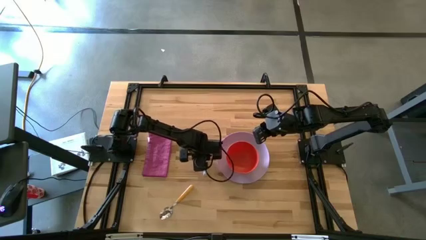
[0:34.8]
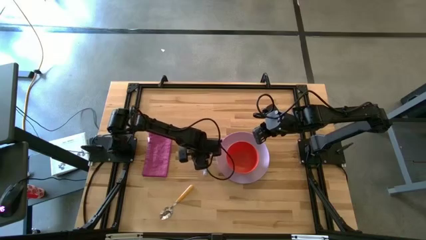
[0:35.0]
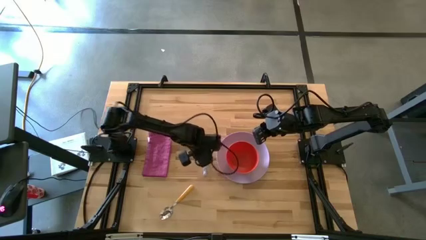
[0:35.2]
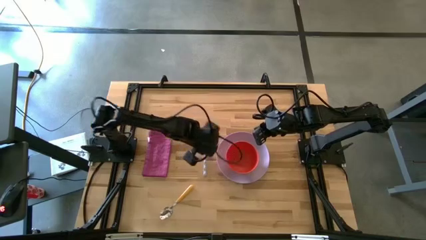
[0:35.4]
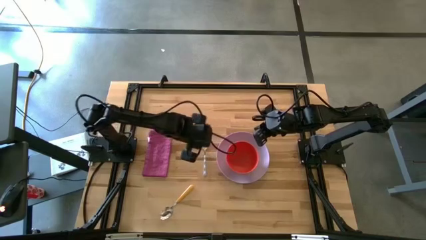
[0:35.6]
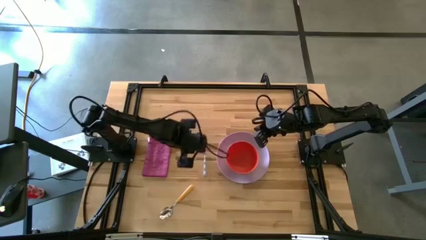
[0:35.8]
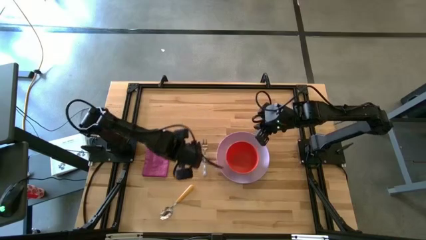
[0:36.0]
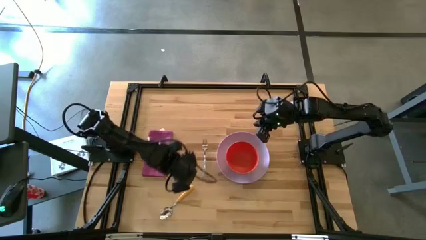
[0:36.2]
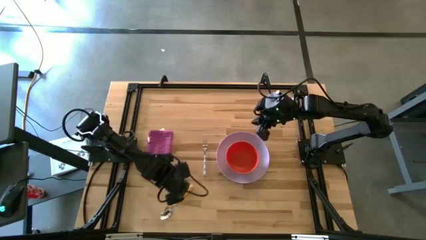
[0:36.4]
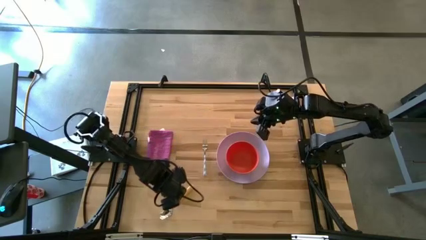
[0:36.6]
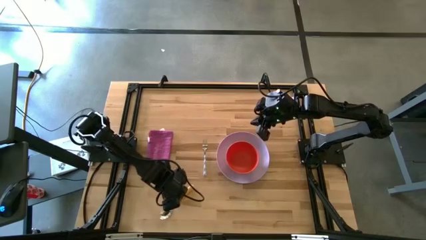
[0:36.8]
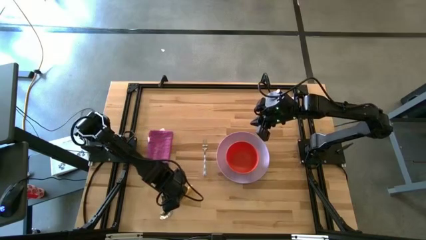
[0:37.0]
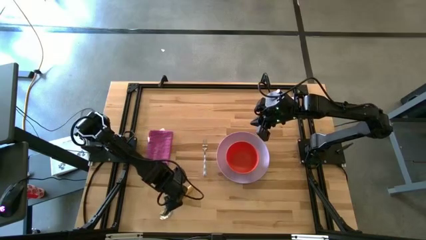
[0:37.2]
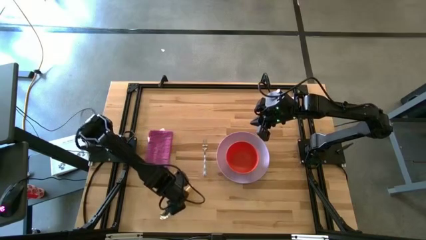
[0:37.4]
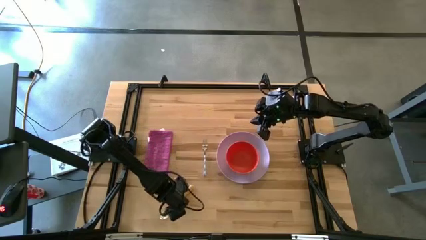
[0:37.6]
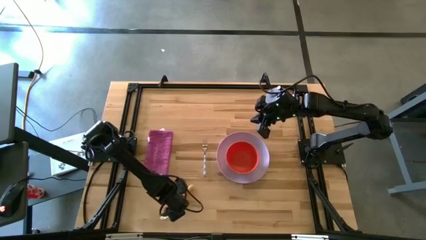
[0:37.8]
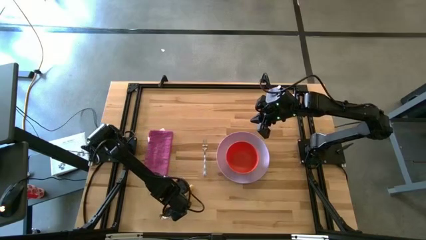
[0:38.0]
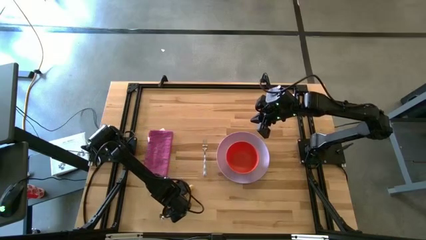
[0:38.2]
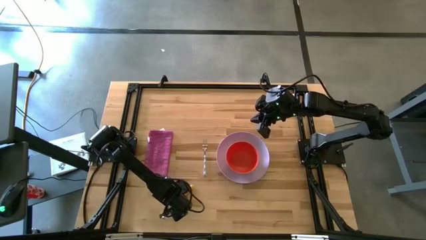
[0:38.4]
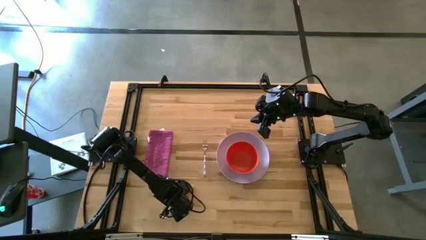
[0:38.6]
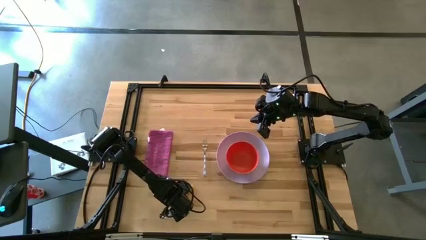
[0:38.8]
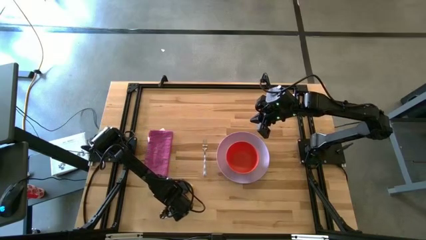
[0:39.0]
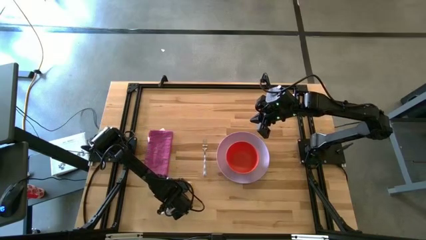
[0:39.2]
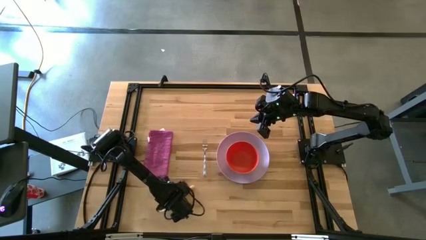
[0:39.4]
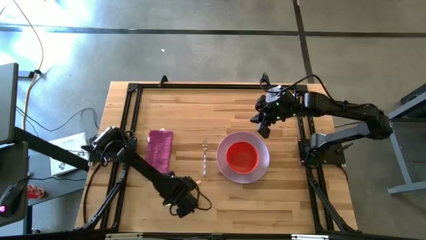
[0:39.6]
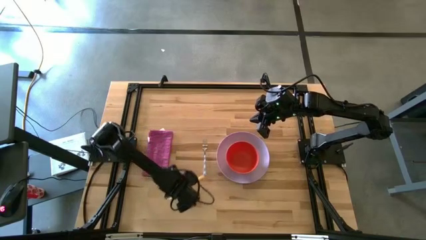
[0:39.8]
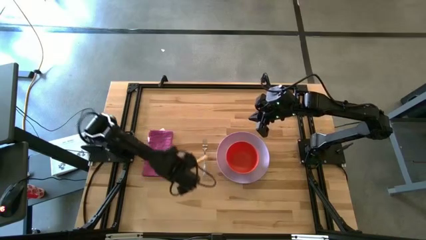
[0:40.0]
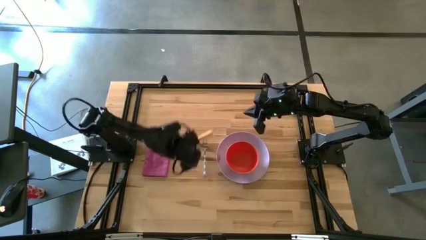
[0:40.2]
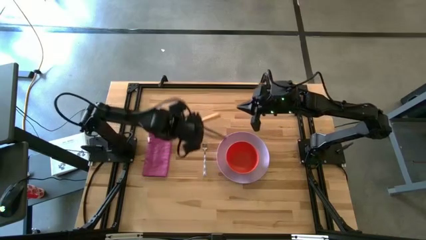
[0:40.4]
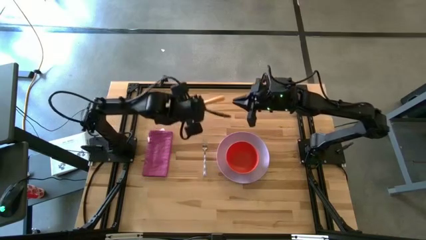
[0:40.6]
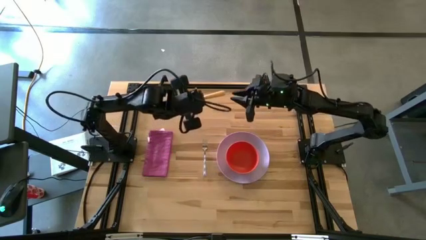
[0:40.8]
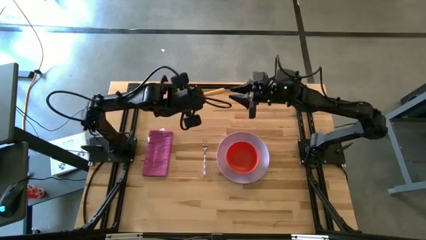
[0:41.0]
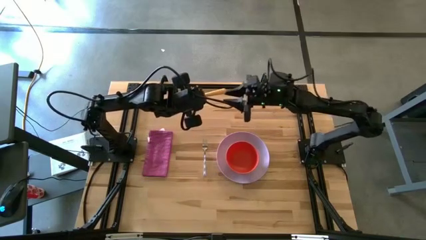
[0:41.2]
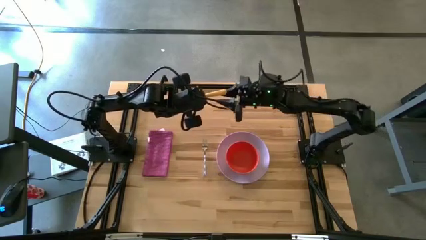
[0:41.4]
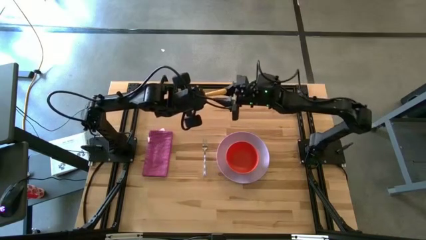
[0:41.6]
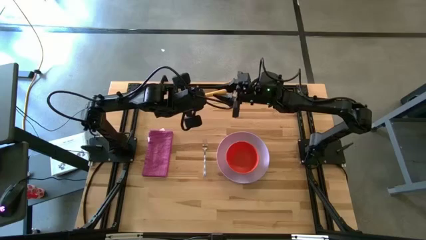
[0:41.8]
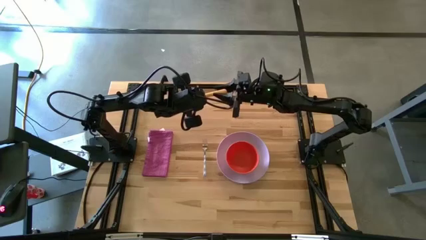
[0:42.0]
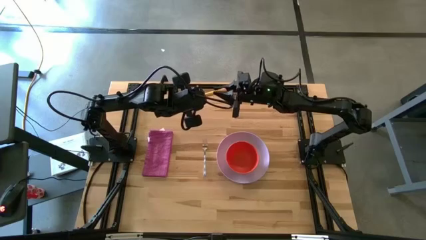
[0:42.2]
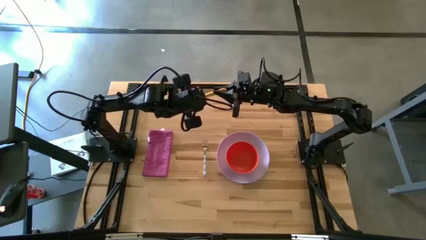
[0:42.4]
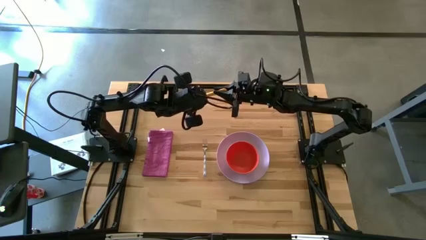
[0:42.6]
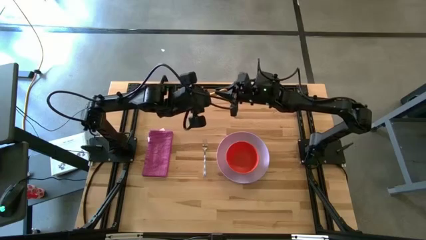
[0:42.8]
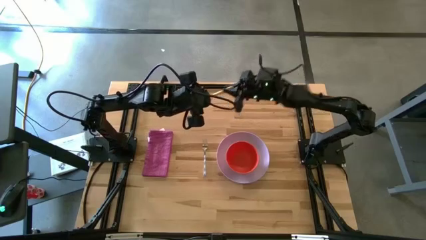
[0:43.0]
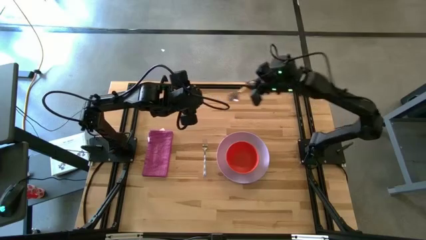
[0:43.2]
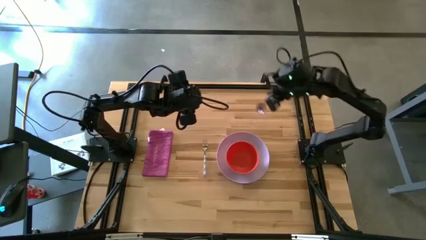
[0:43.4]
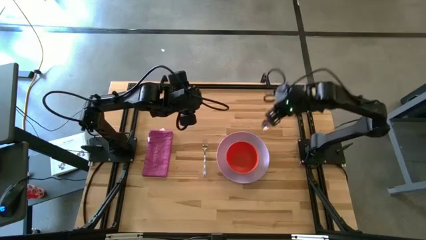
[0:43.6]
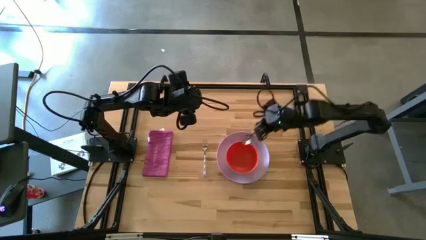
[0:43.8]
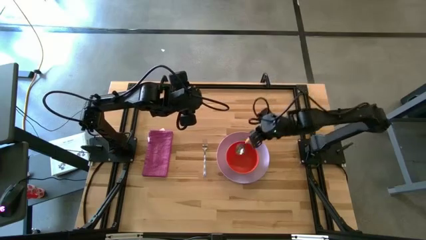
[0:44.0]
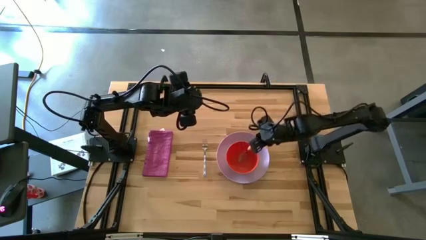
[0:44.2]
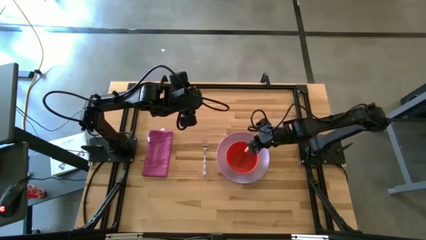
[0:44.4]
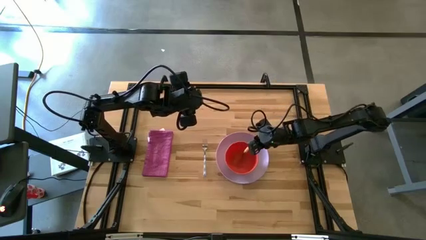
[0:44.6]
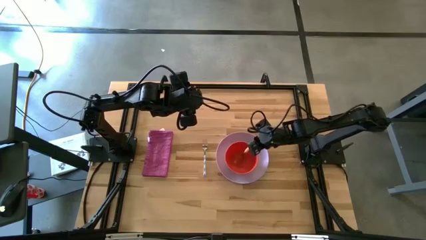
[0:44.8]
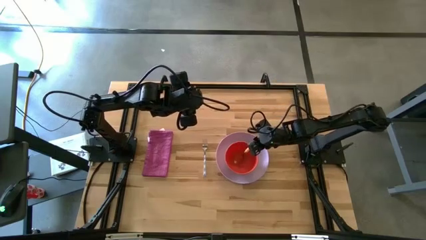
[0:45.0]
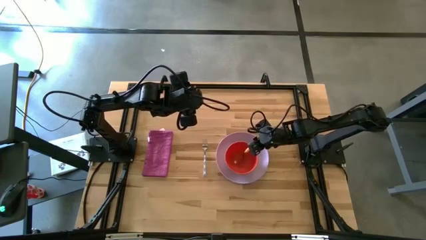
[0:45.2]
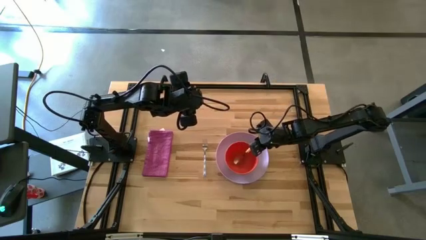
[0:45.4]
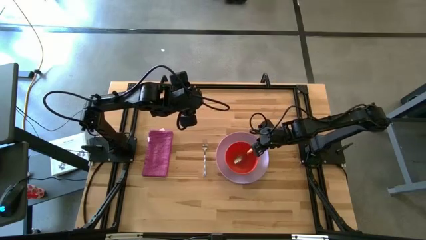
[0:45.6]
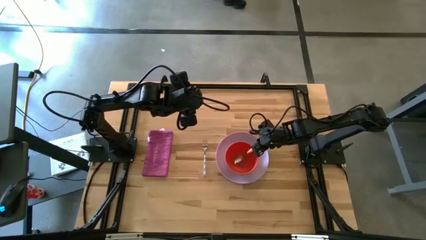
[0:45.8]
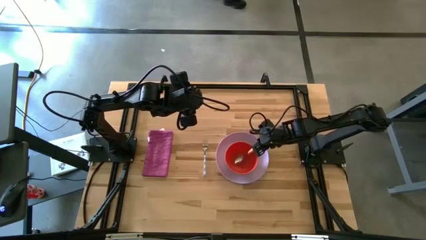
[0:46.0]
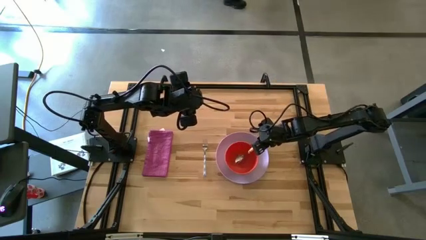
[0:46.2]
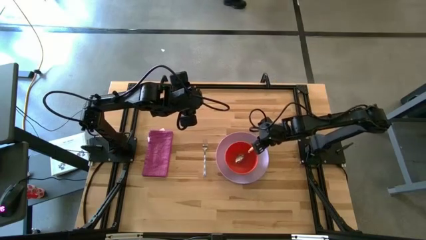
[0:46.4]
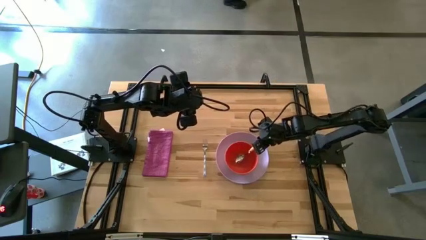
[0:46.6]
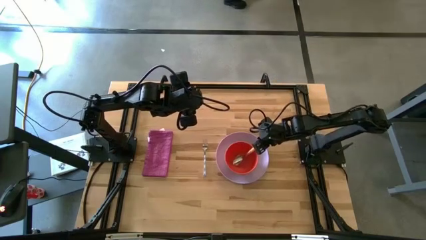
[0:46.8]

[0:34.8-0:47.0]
Task: Set table place
Put the wooden spoon into the orange bowl
